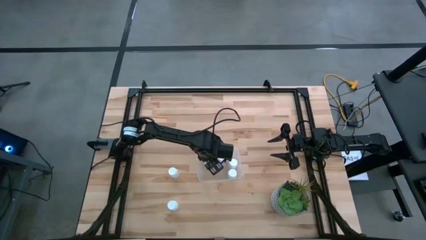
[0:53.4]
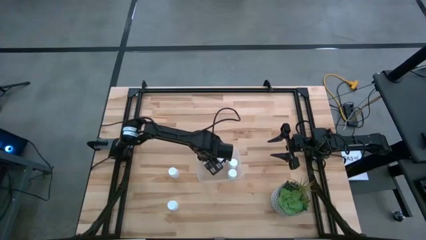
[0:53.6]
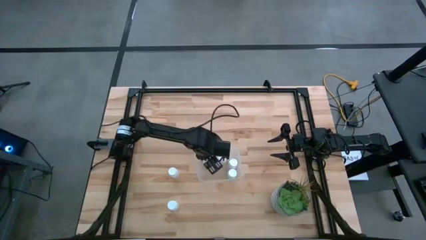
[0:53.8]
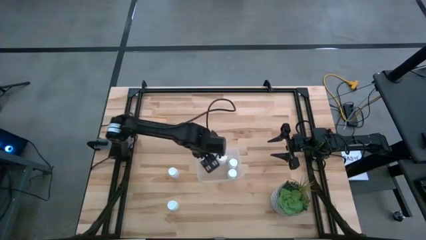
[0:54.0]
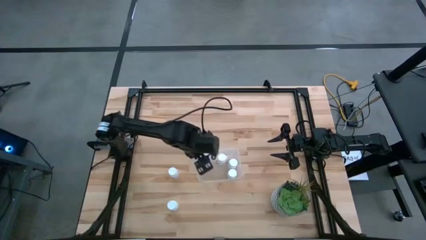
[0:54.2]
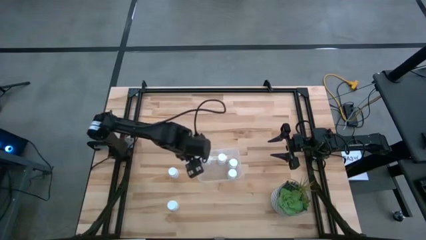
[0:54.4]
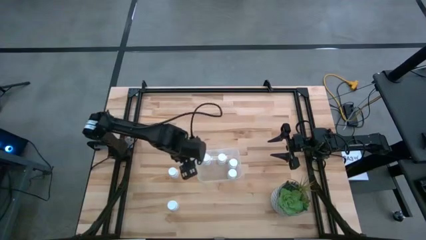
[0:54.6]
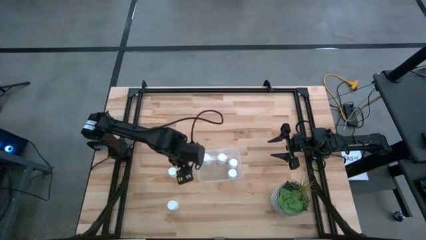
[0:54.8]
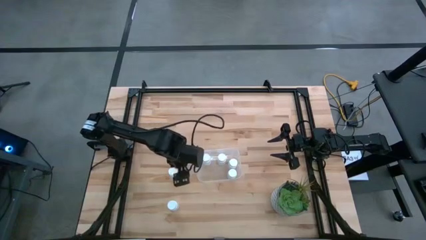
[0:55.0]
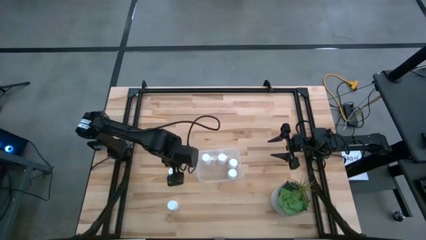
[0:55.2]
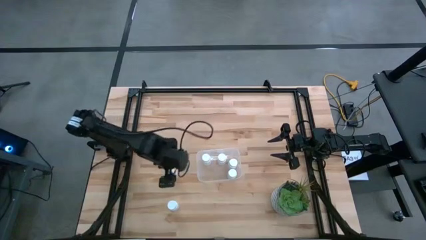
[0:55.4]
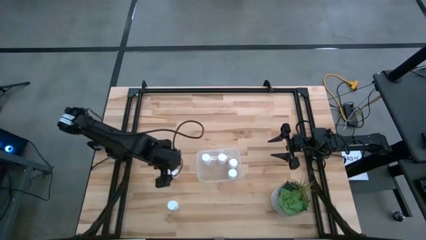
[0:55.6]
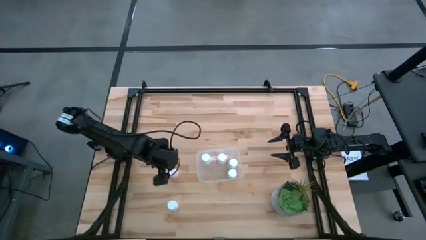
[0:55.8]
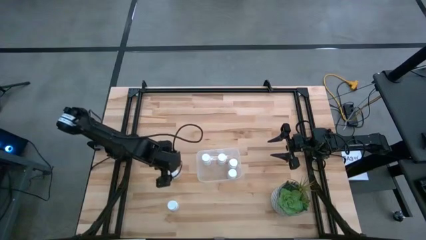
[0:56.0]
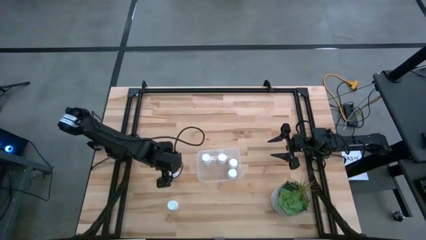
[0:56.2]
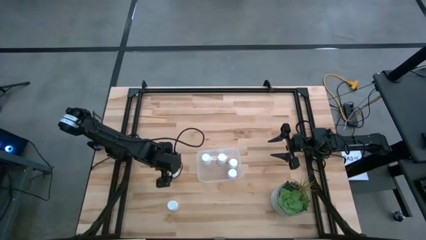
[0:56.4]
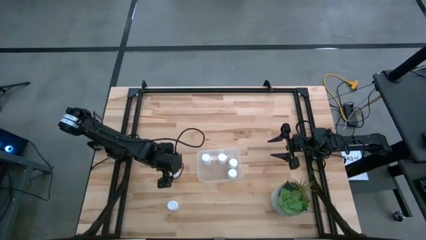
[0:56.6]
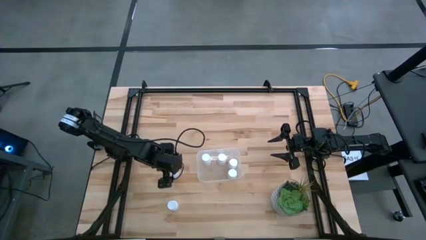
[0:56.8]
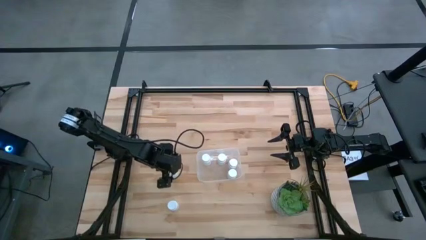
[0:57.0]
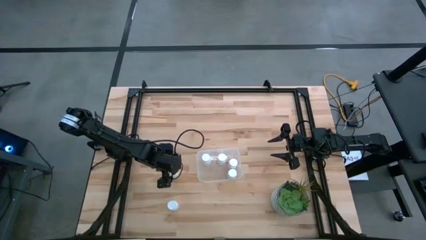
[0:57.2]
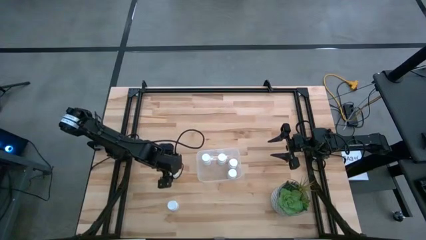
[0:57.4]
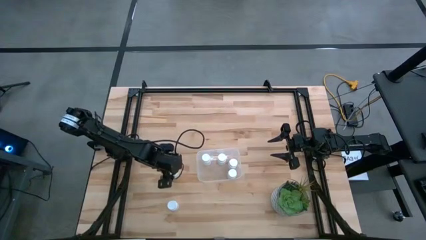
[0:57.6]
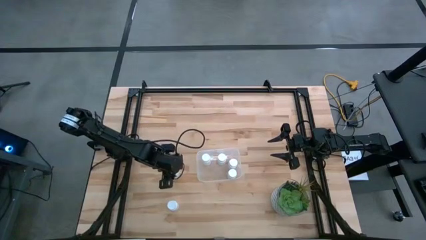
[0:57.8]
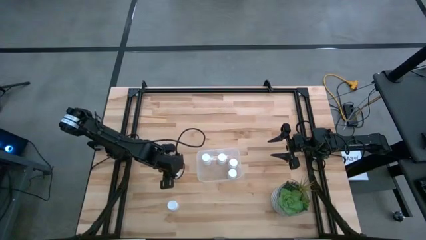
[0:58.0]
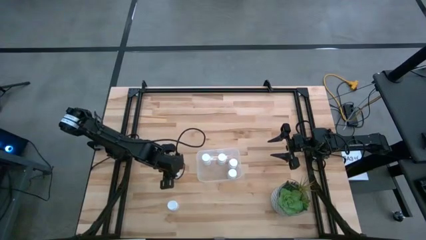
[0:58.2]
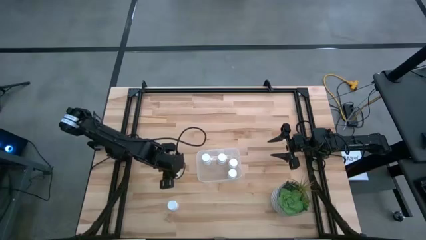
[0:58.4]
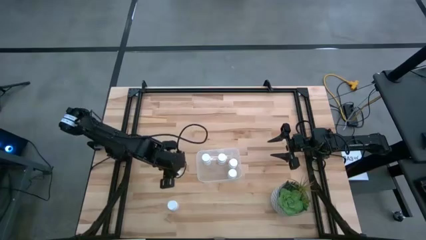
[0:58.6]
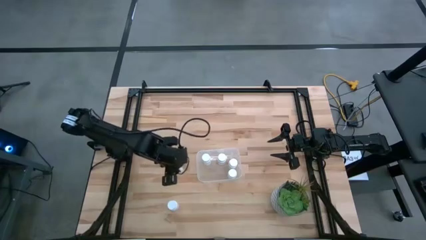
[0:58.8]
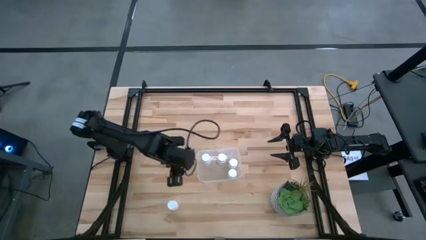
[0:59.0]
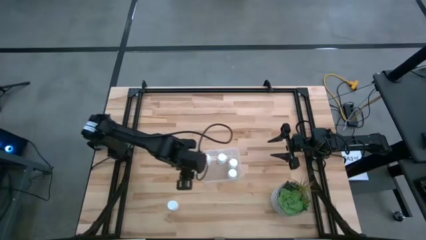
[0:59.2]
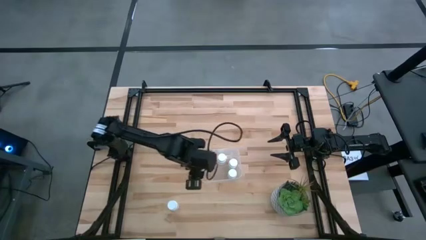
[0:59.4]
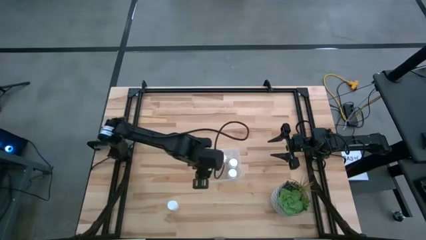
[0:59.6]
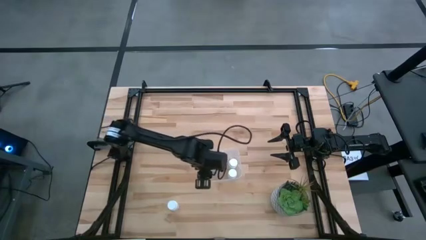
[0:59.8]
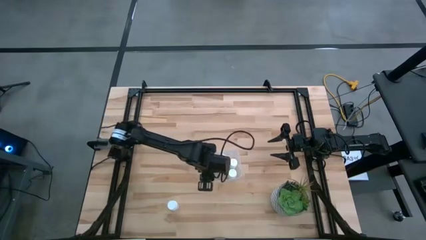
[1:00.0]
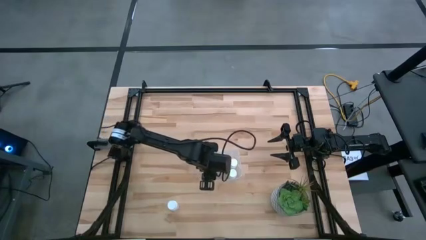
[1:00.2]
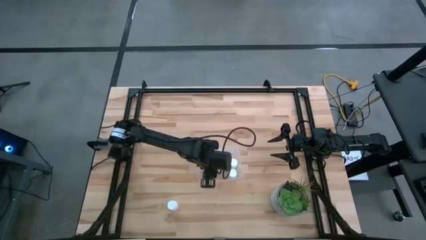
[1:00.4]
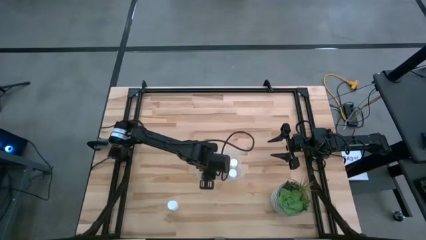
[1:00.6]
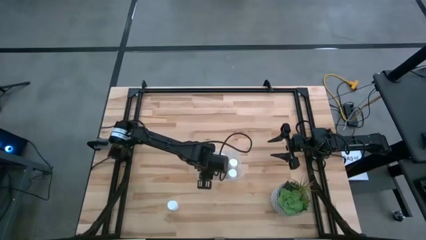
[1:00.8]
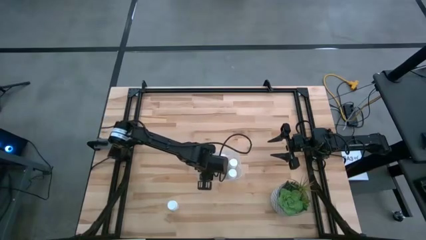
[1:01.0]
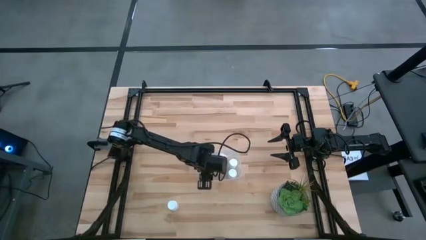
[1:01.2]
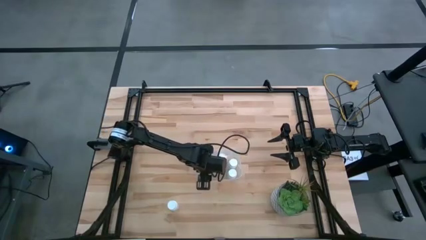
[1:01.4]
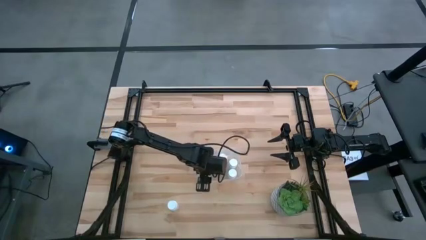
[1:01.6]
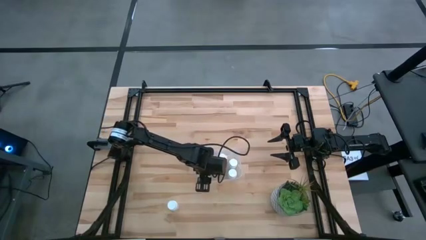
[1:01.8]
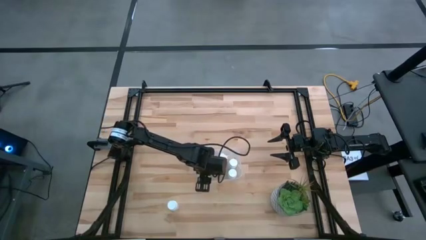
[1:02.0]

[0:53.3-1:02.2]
Task: Pick and place pill bottles into a basket
Put the white medicine bottle into the transparent bin

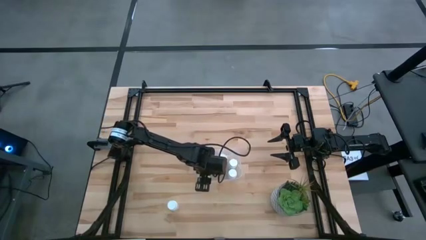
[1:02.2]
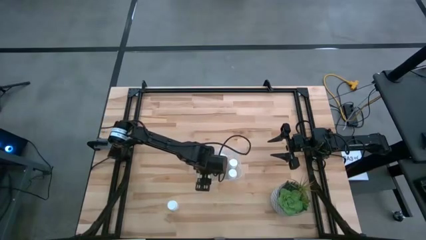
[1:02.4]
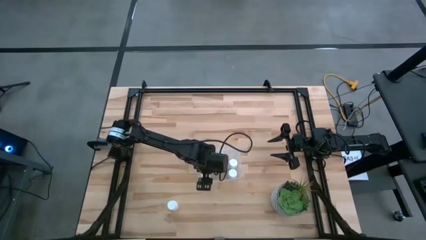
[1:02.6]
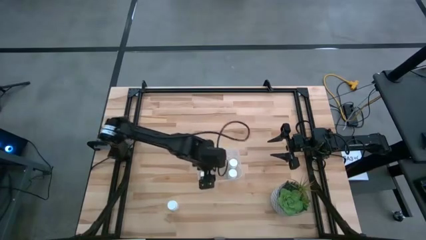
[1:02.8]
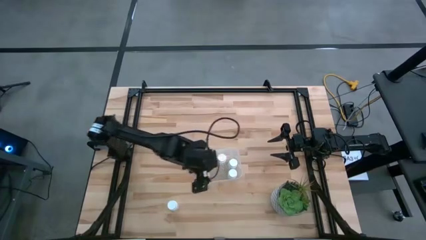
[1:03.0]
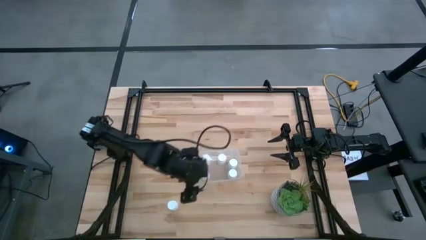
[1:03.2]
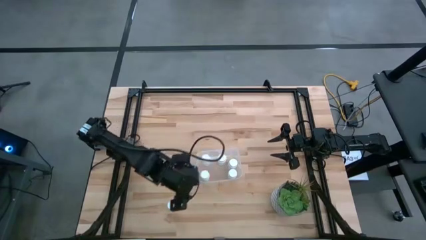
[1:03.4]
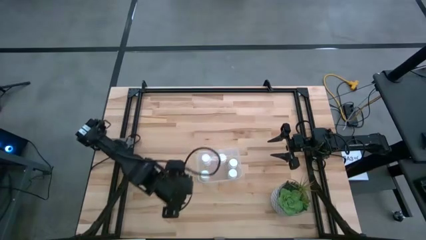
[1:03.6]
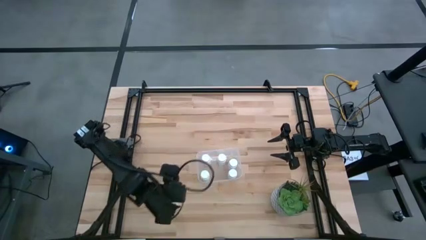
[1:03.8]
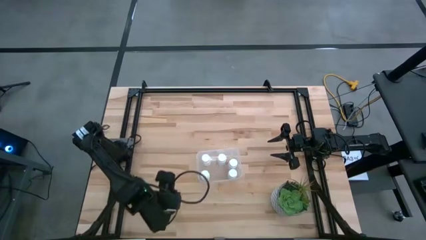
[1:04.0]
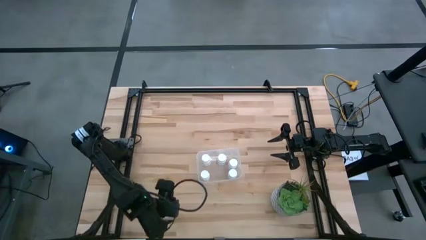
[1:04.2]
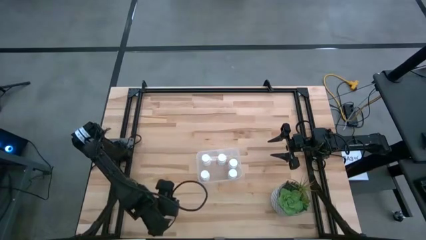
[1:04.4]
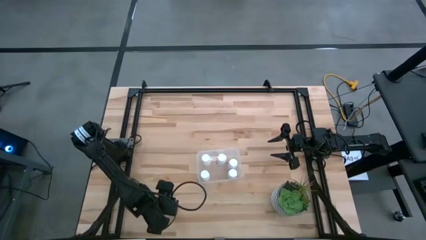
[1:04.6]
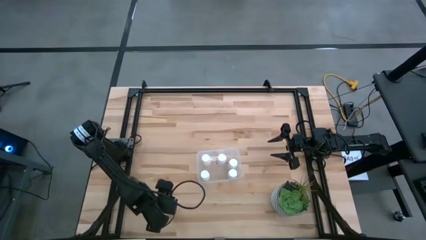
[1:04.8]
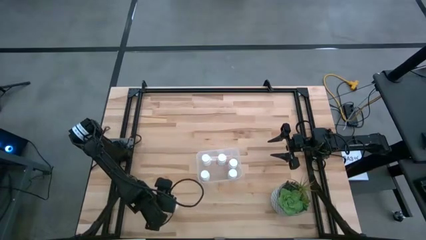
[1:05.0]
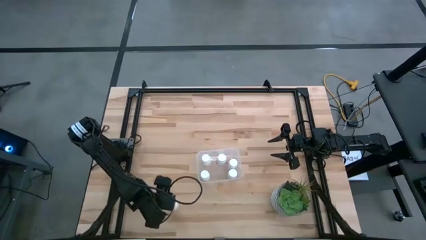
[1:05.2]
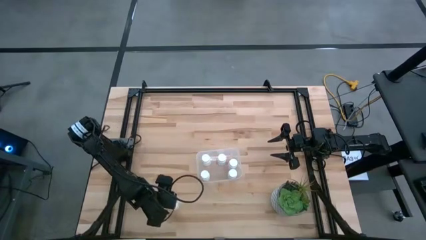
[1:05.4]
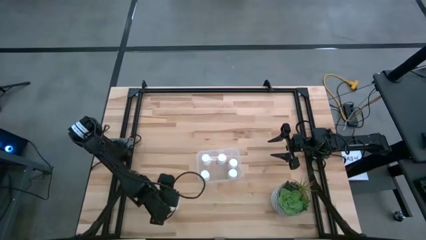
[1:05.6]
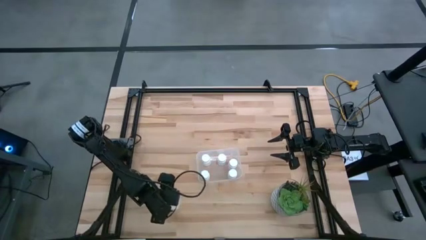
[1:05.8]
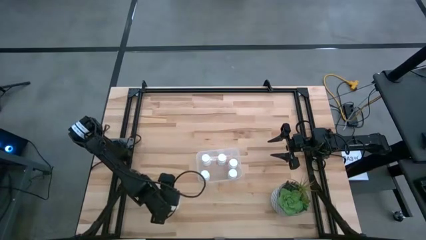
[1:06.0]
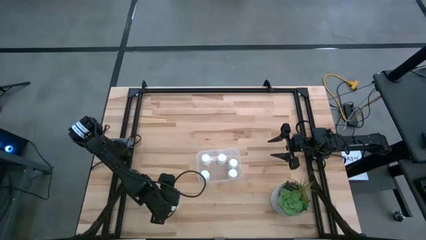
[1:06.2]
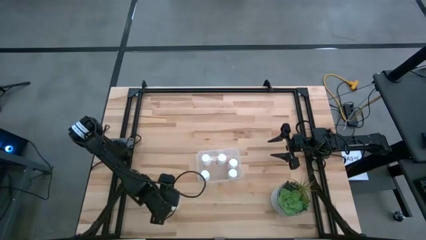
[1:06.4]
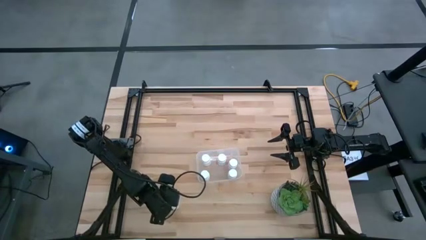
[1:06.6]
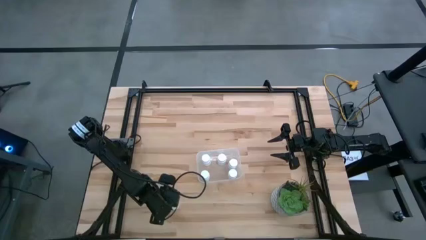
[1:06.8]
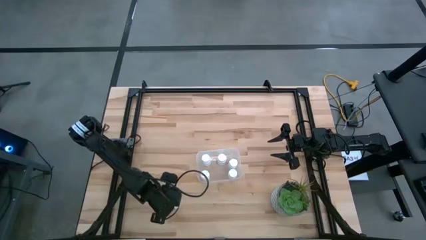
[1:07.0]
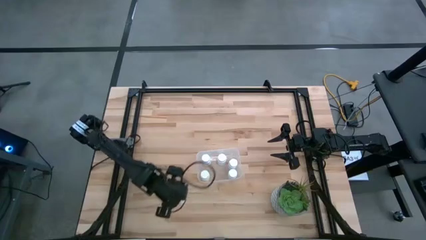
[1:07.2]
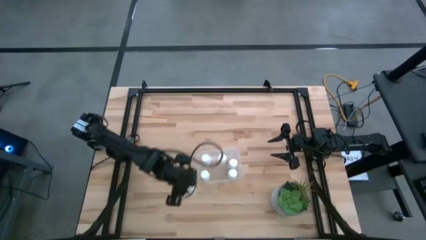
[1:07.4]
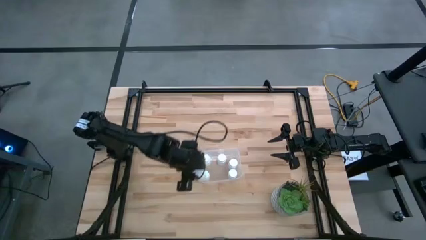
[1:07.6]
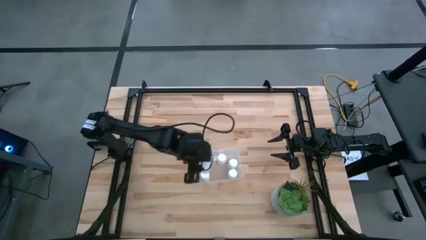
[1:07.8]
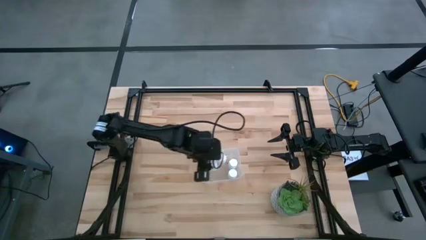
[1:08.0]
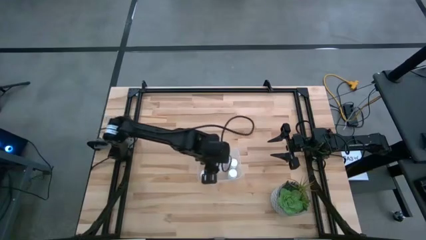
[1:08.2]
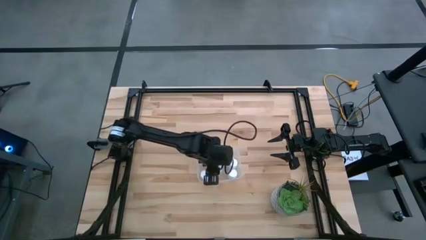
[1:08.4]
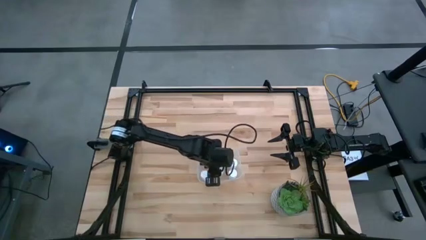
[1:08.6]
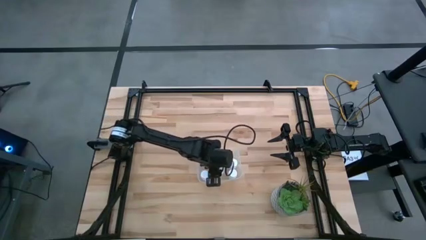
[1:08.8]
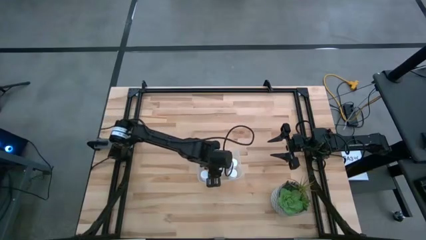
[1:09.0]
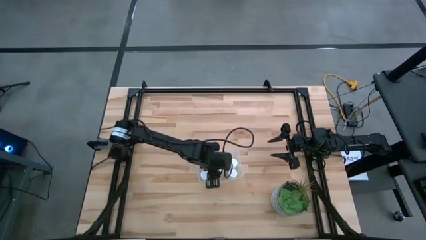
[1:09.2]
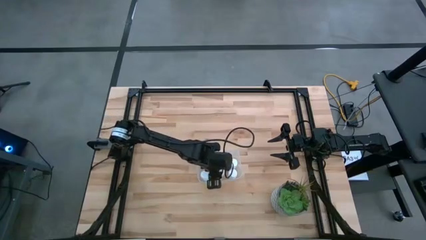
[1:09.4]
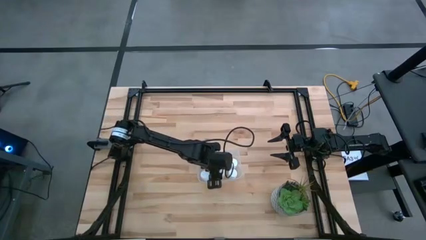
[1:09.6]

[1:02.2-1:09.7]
Put the white medicine bottle into the transparent bin

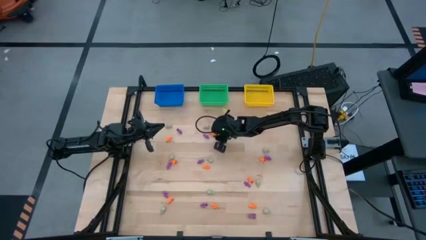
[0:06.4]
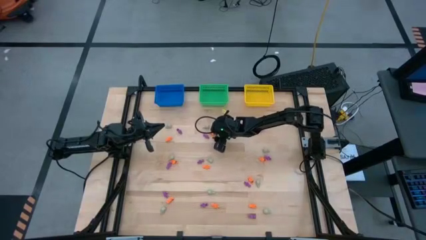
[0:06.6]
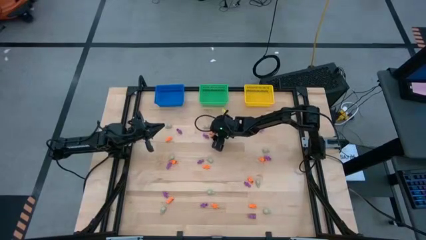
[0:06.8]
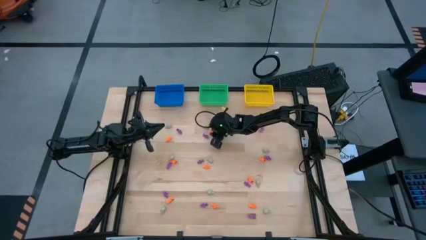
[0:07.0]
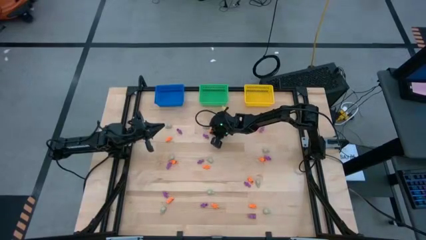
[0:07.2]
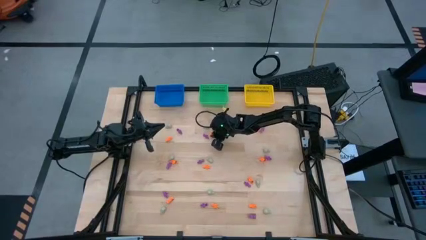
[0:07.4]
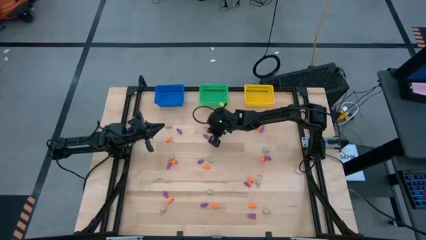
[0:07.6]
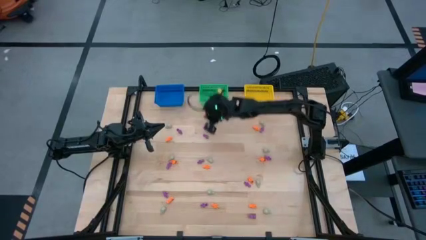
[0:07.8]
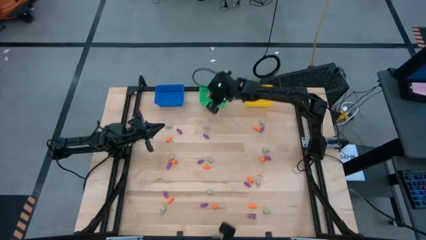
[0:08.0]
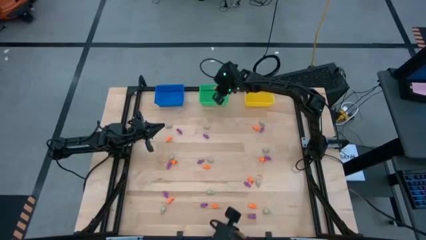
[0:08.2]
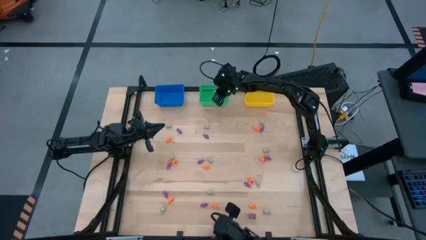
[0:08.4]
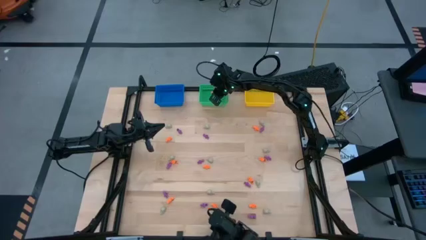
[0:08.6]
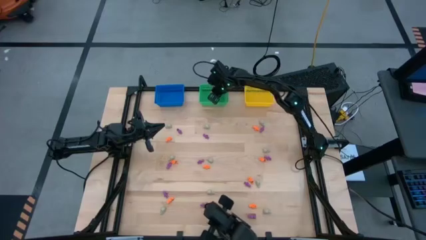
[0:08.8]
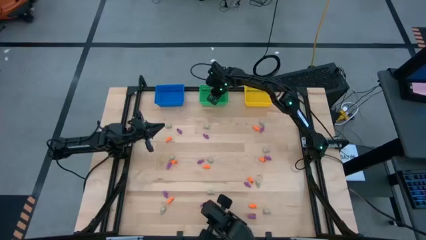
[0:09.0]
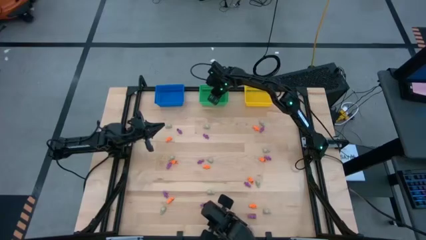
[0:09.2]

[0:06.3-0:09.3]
Task: Sort Halloween decoration
Put the orange skeleton toy into the green basket
